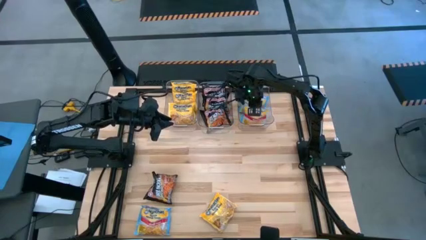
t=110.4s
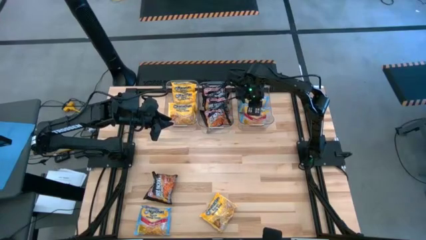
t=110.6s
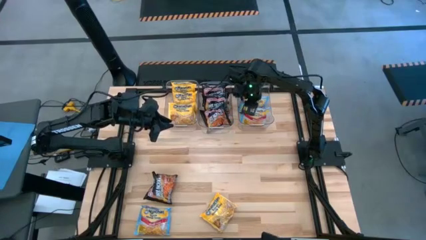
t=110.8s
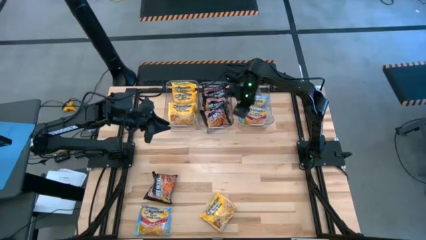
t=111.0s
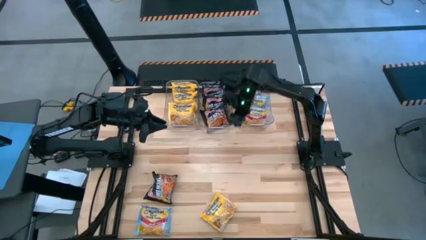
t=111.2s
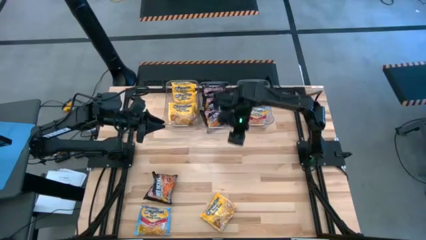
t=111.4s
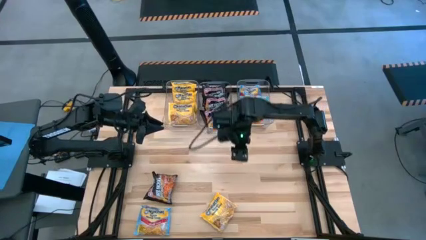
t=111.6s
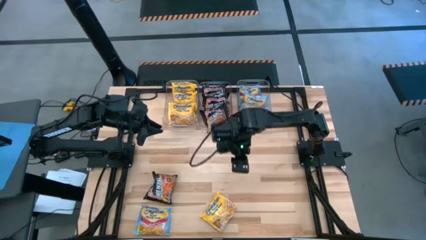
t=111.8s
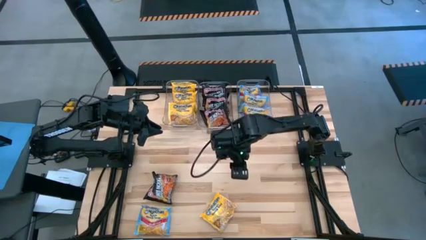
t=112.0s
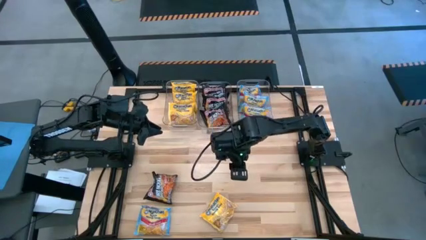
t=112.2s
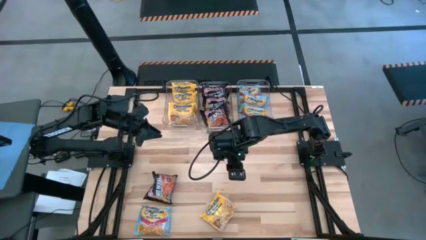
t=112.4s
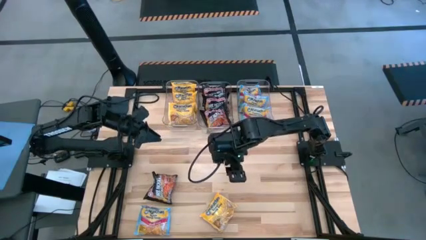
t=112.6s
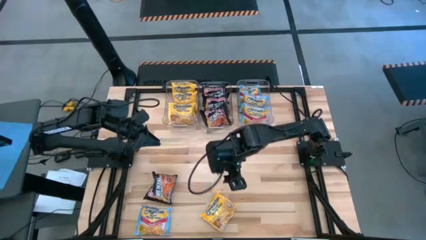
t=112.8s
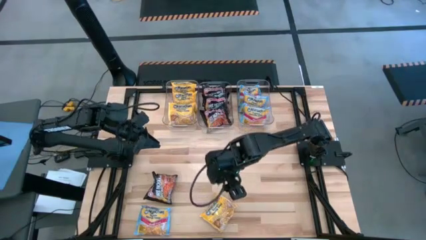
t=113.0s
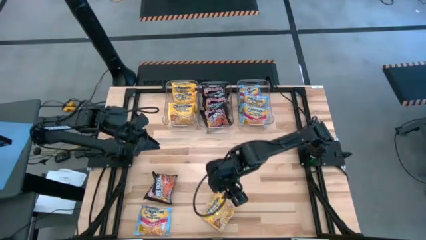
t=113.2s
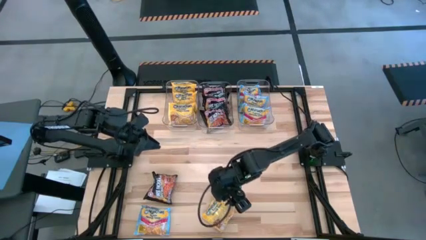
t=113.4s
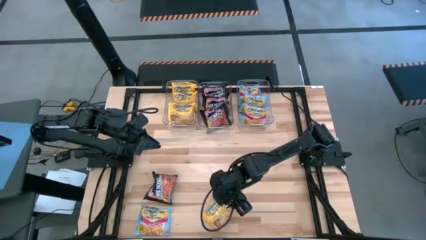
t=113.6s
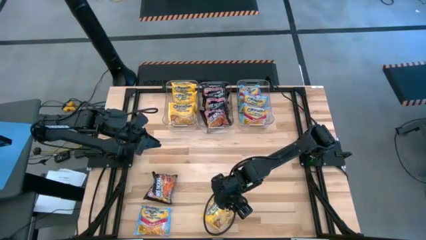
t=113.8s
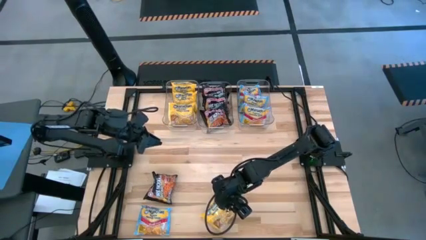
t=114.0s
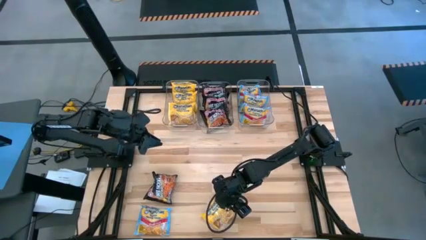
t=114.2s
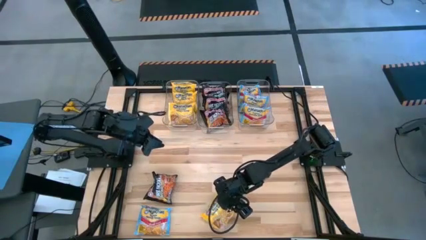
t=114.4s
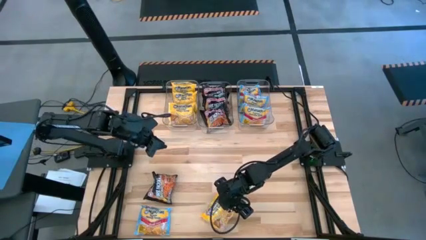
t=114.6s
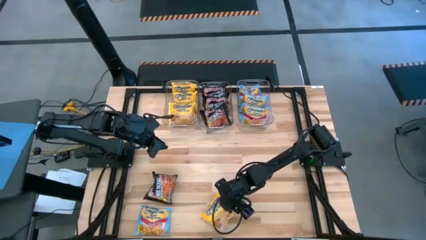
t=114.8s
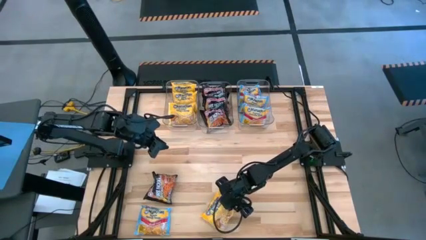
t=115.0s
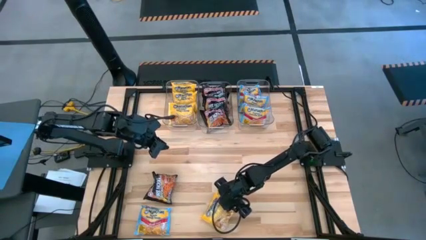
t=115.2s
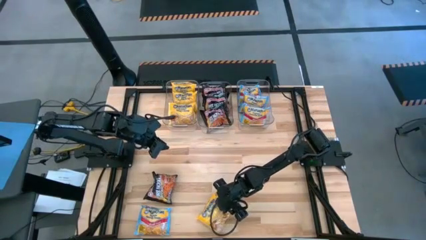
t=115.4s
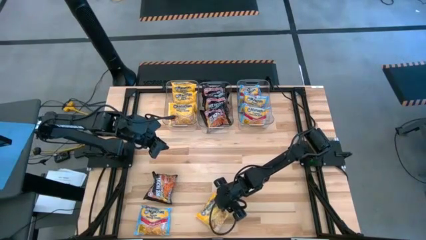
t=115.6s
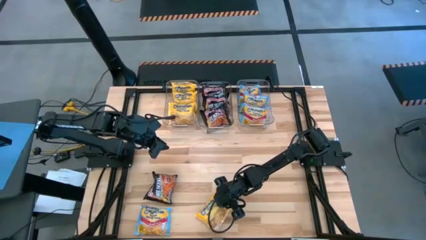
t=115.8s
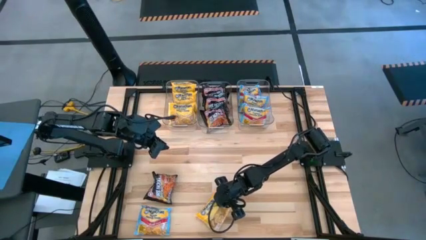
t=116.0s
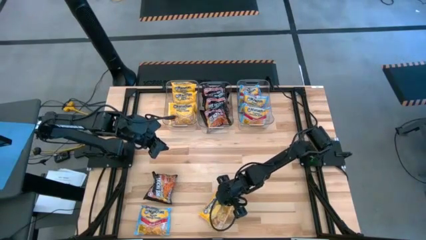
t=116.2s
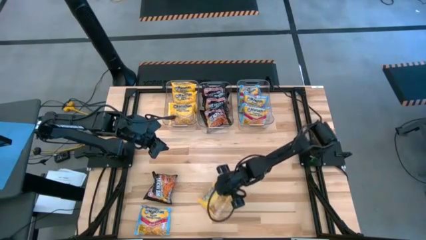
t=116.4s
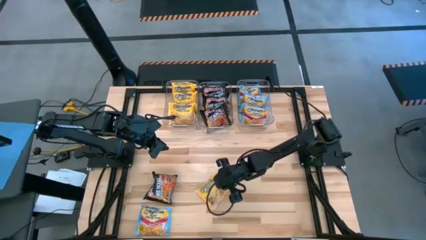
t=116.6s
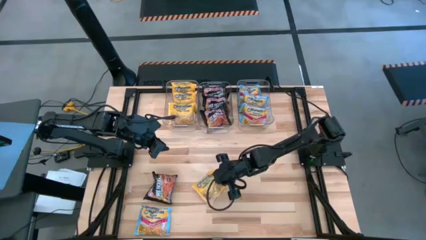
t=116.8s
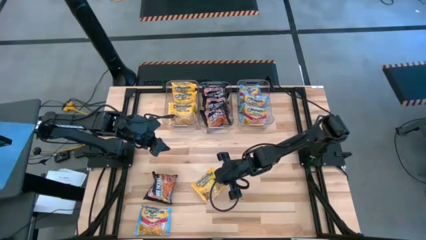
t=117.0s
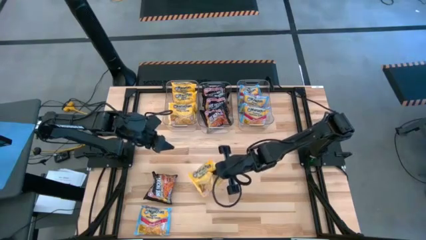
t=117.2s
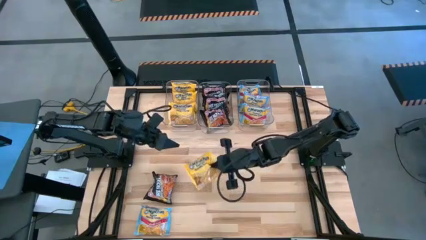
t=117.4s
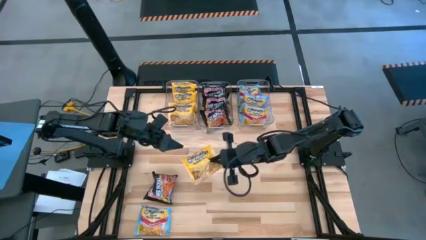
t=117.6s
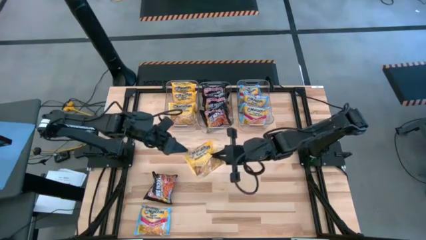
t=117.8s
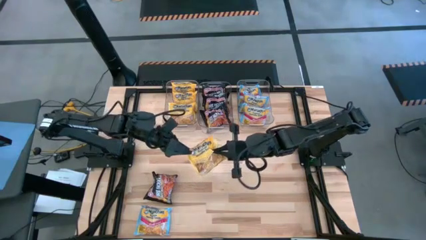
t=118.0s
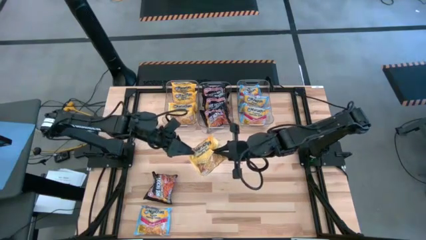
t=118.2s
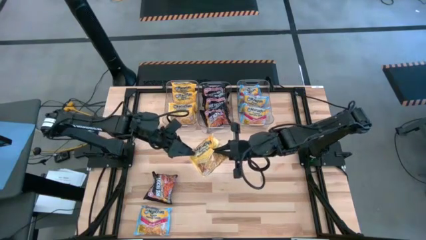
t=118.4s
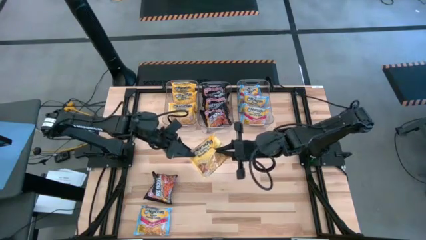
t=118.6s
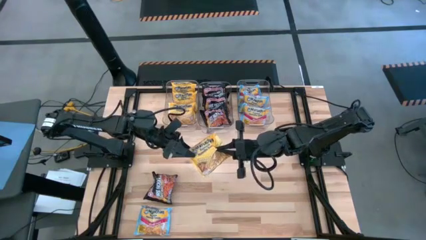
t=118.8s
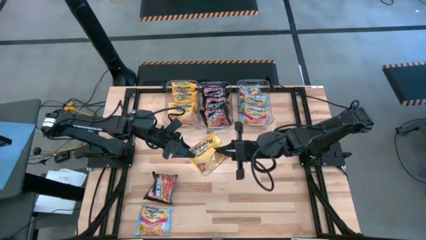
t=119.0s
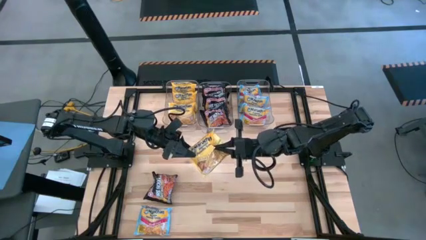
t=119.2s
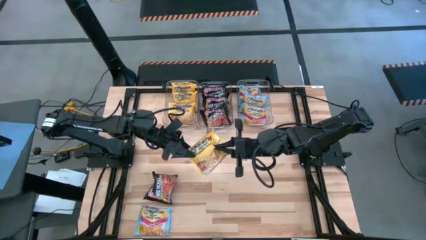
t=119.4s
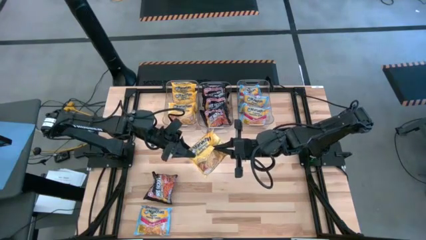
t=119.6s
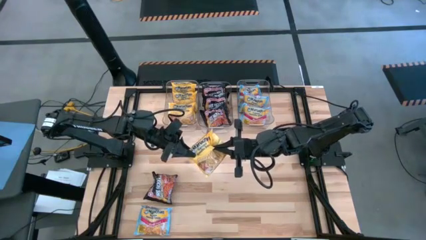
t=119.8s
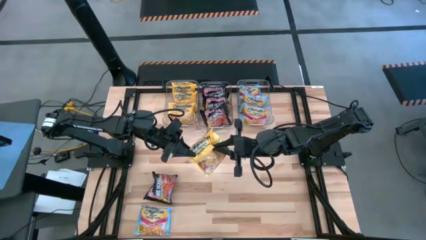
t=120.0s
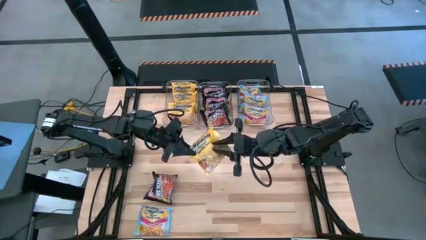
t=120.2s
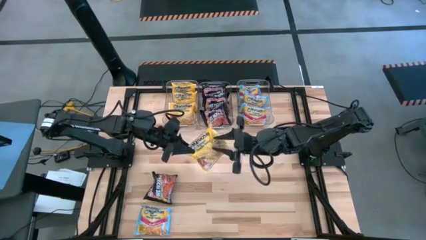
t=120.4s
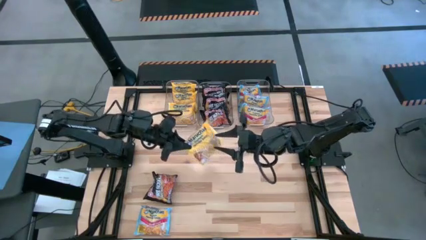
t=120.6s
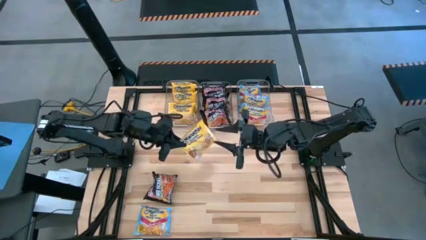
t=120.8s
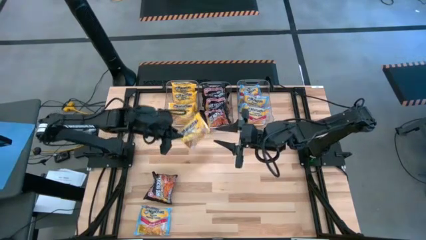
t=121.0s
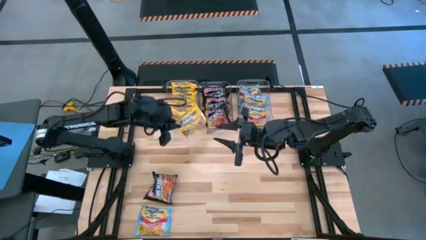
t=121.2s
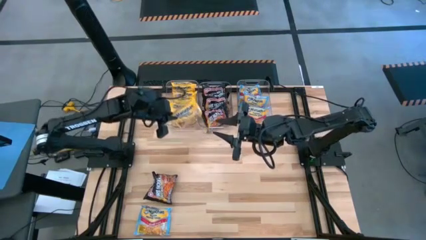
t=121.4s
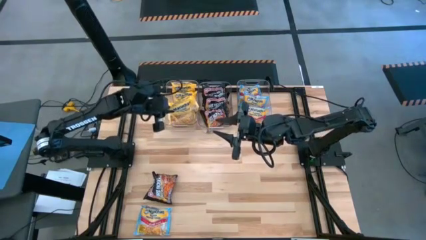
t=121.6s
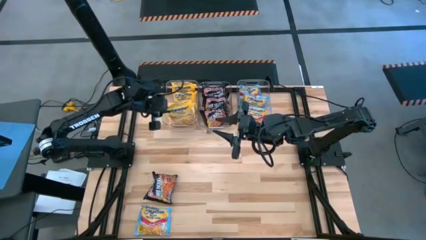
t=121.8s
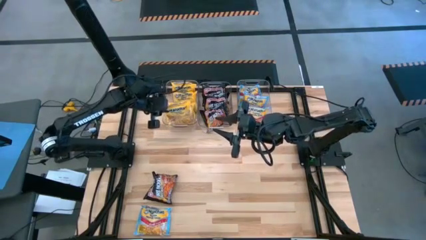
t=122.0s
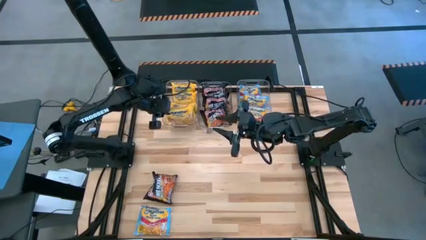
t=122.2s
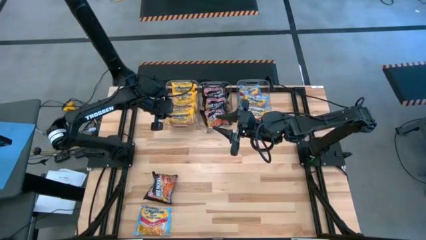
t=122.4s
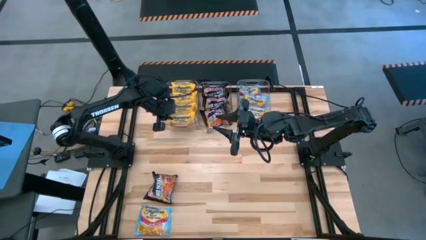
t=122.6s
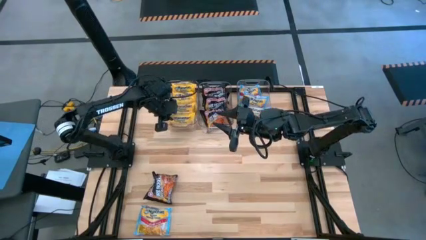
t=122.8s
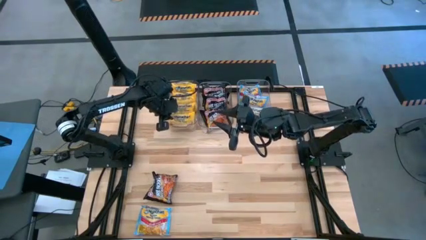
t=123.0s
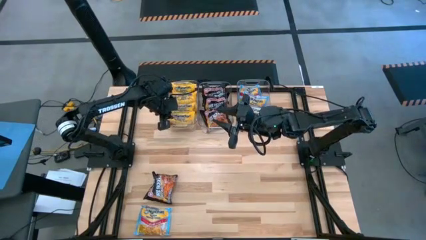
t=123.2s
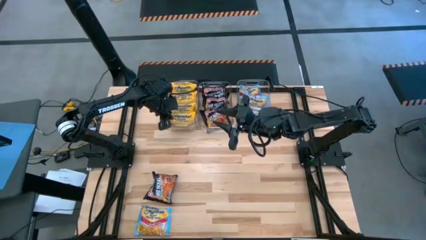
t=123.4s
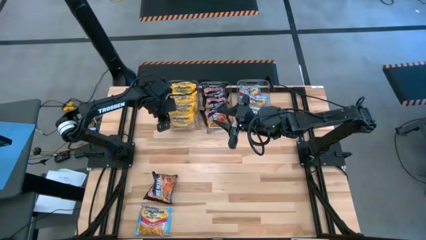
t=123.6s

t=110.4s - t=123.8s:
Task: Sort Maruchan noodles
Put the yellow noodle pack in the left transparent bin

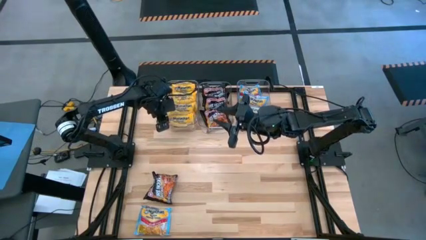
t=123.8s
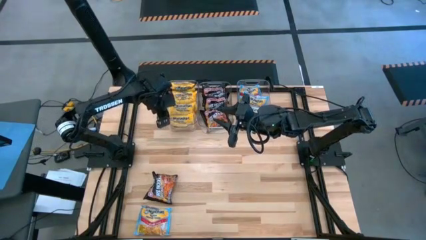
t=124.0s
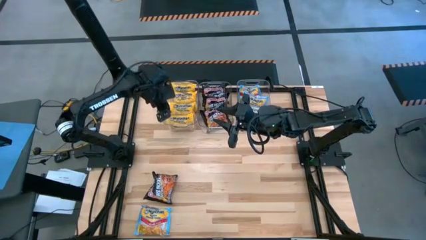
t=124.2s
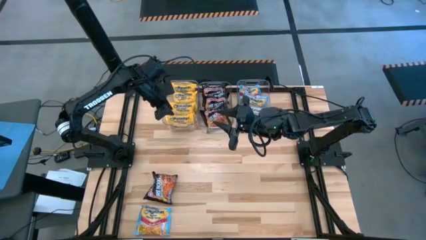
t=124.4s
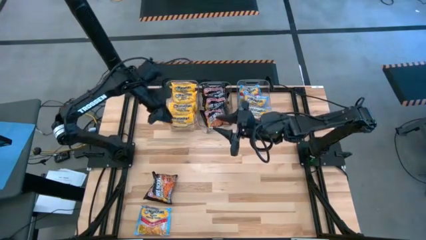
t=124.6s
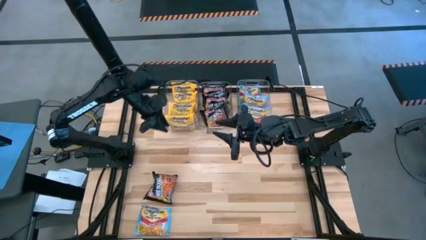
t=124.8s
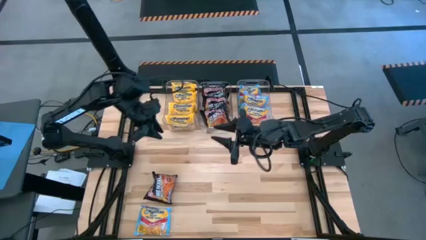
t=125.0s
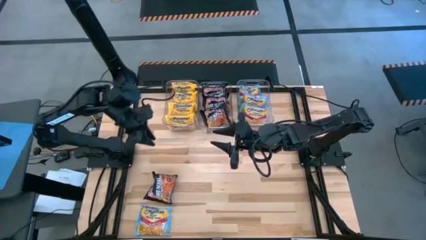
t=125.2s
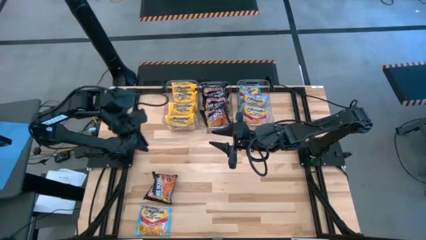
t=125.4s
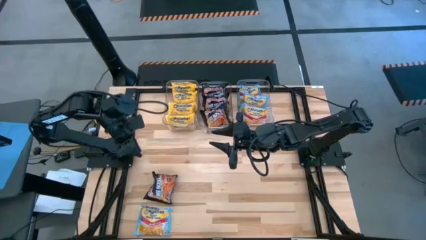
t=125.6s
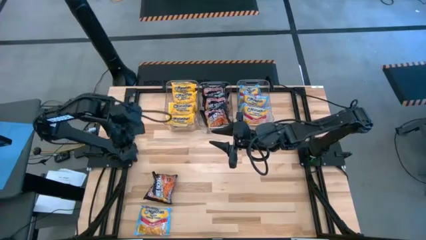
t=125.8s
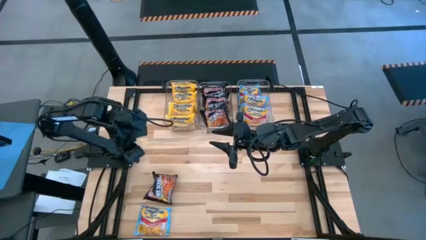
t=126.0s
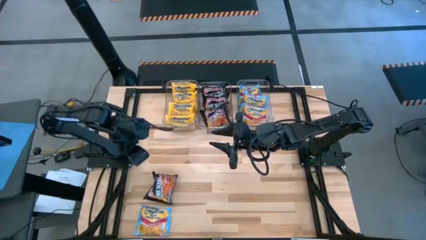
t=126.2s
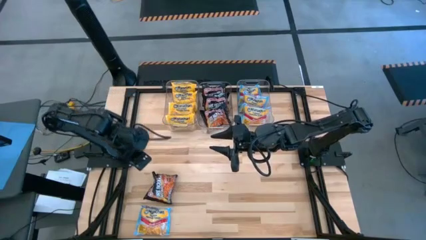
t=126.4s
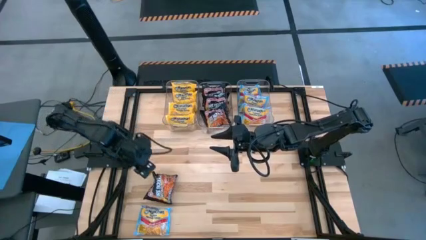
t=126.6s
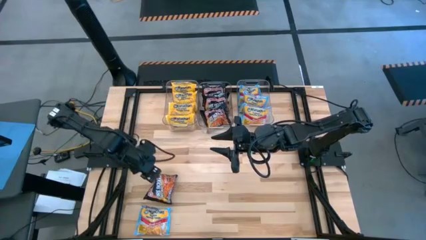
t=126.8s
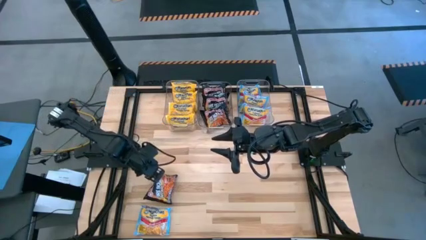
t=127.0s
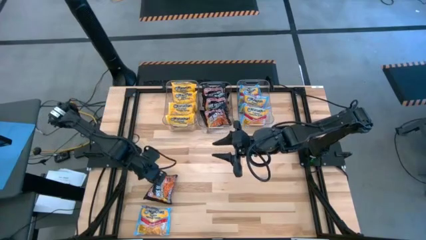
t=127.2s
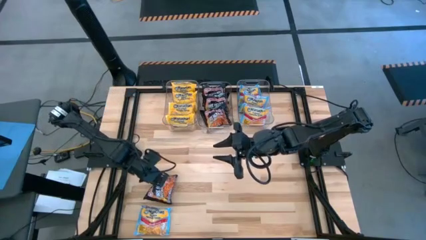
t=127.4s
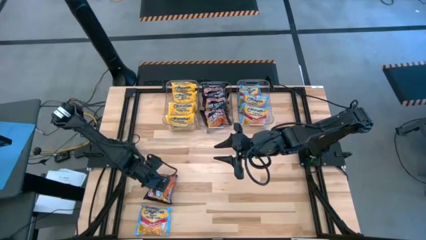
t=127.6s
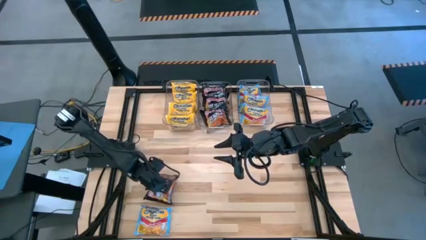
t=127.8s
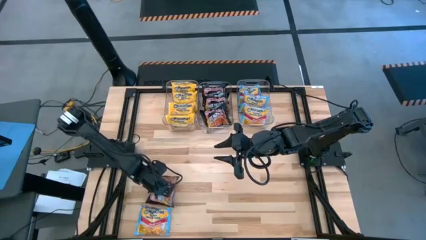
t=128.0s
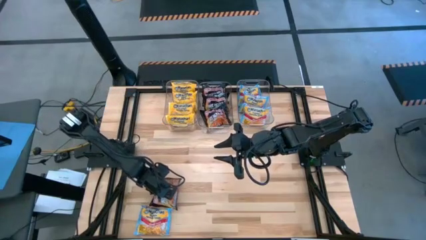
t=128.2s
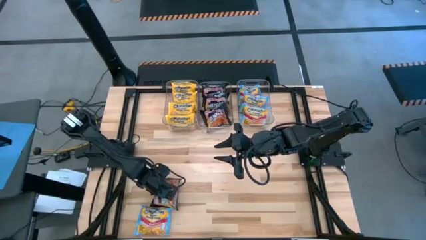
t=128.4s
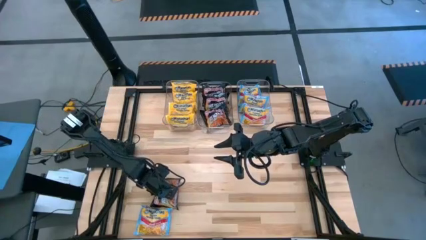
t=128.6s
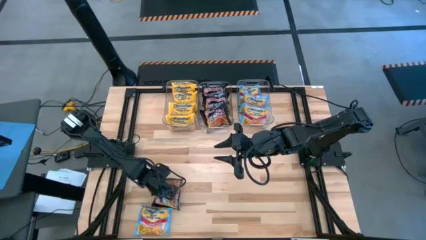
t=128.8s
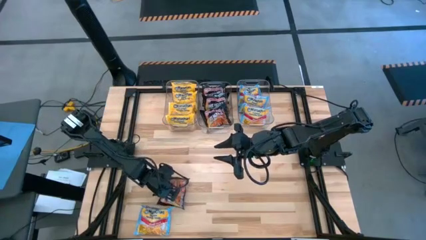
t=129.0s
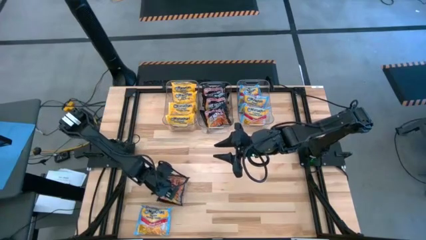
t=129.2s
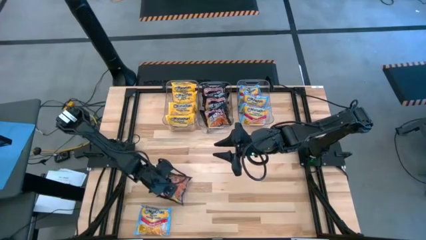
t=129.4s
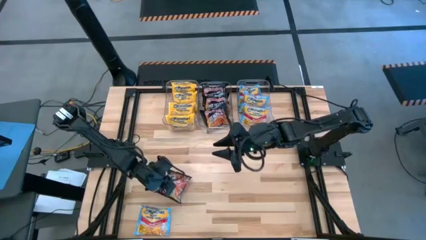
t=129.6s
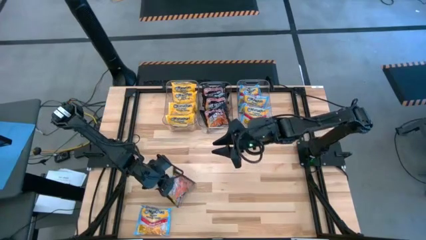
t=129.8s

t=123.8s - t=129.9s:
Put the black noodle pack in the middle transparent bin
